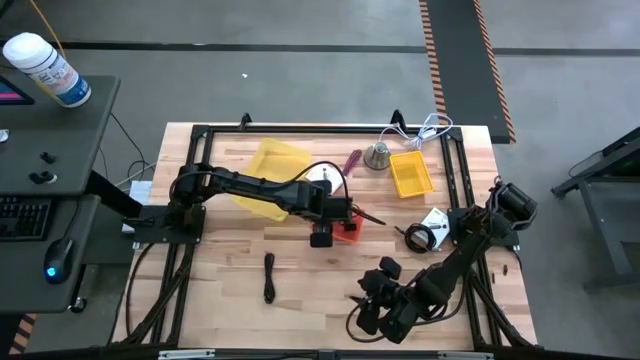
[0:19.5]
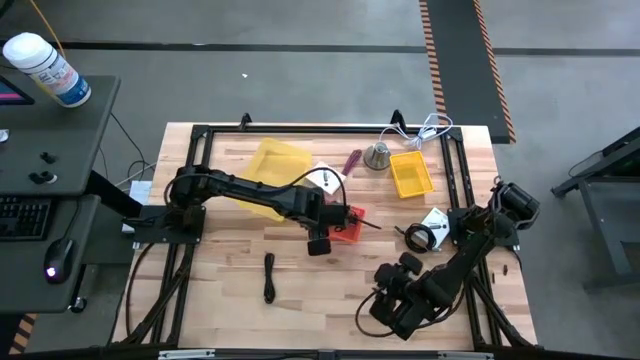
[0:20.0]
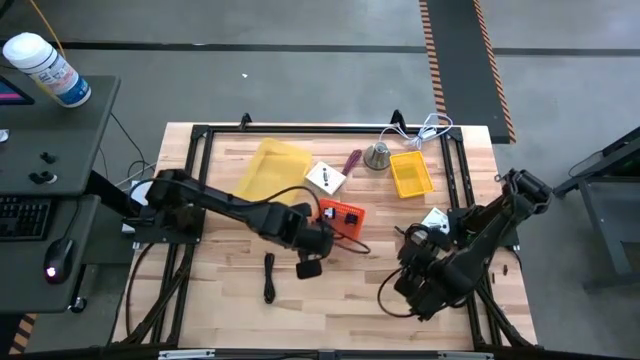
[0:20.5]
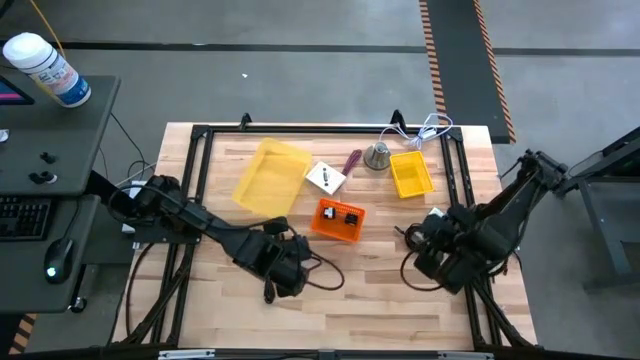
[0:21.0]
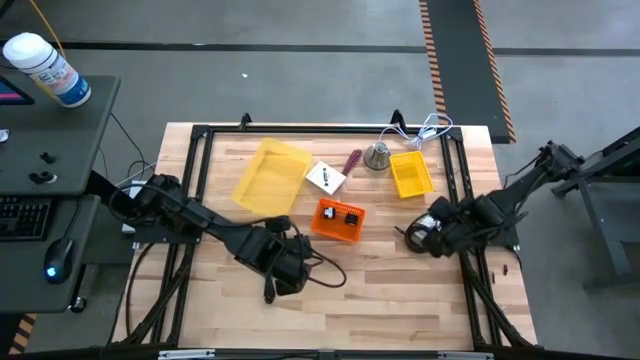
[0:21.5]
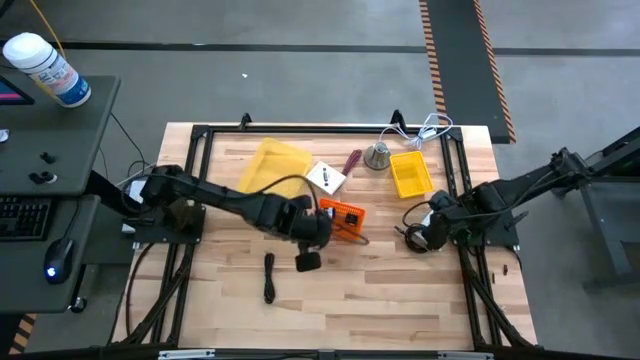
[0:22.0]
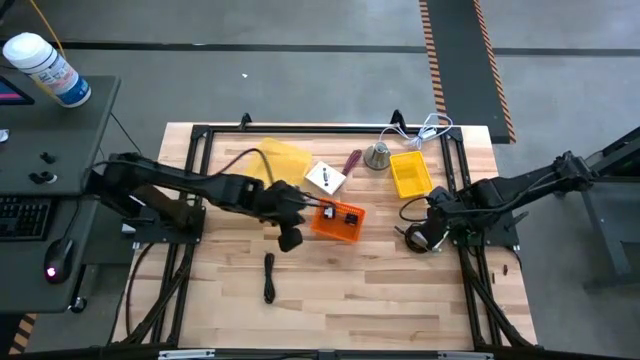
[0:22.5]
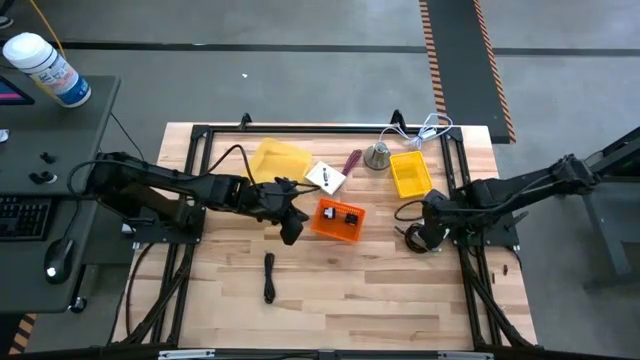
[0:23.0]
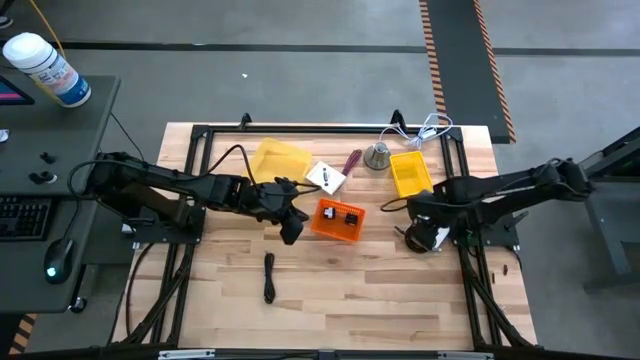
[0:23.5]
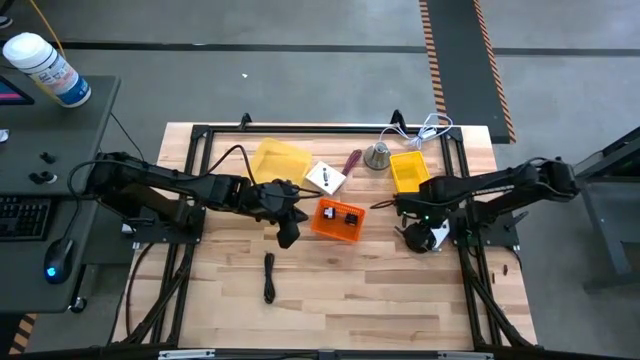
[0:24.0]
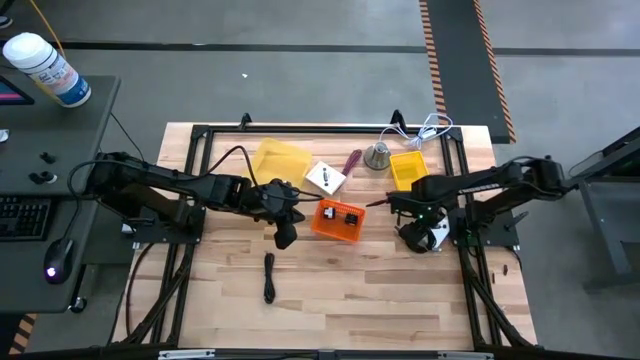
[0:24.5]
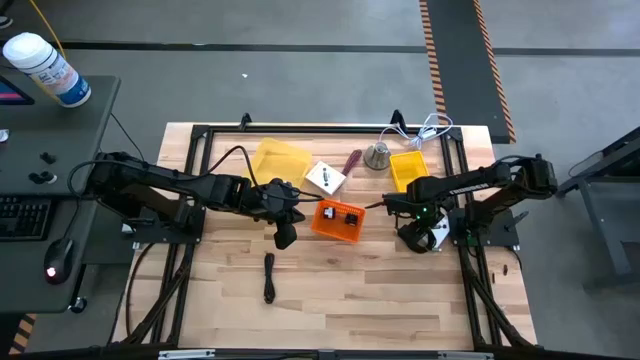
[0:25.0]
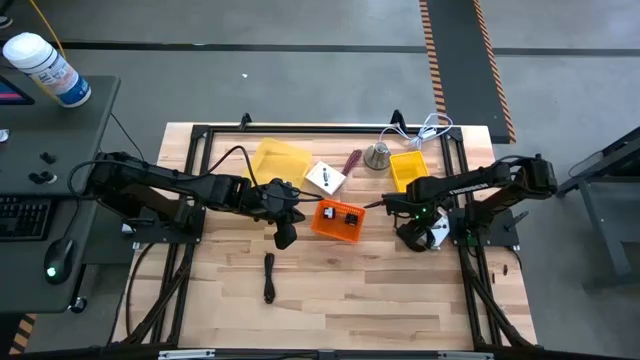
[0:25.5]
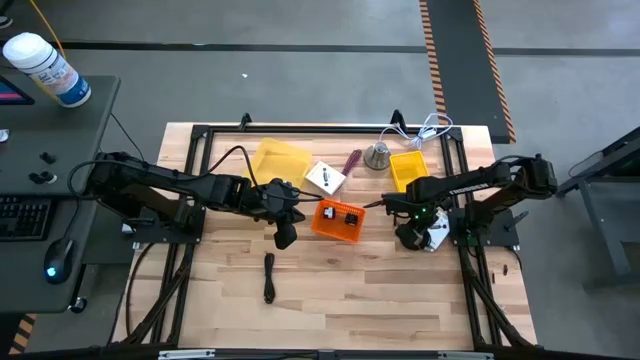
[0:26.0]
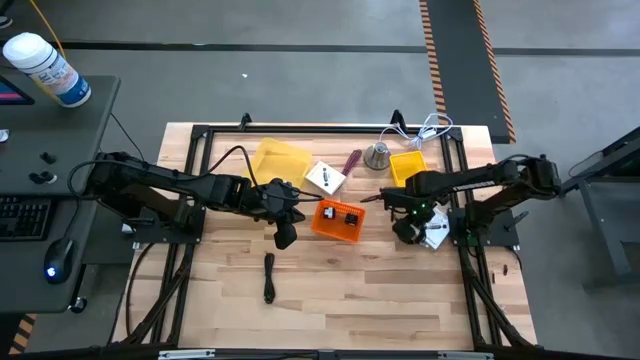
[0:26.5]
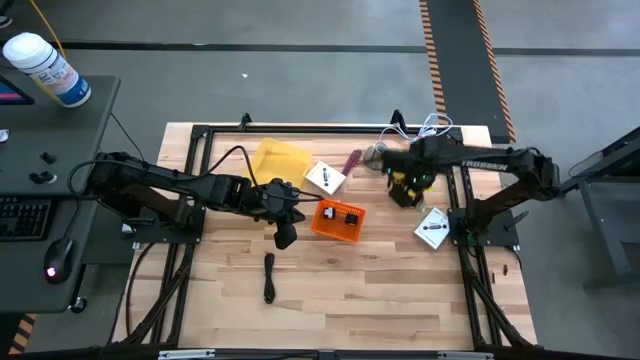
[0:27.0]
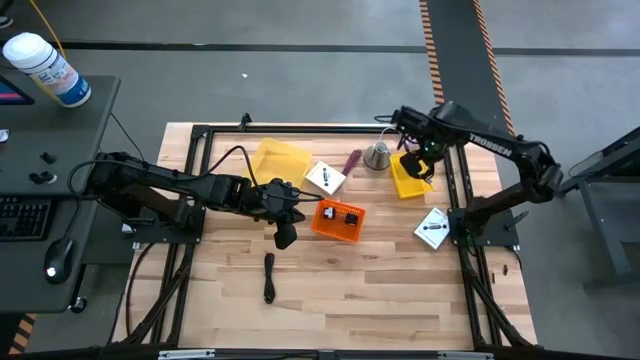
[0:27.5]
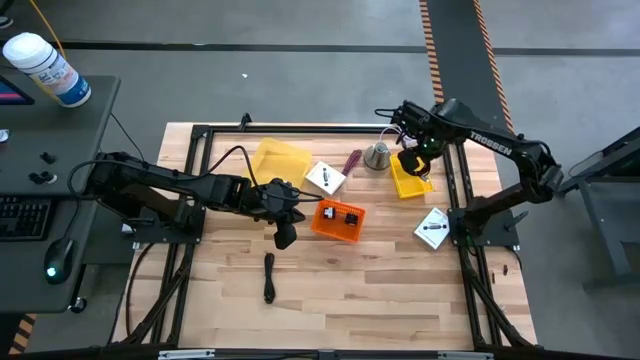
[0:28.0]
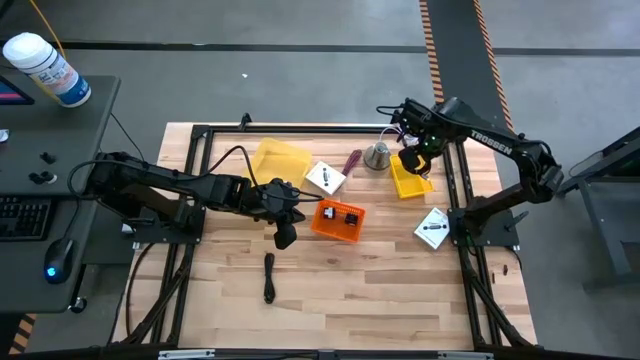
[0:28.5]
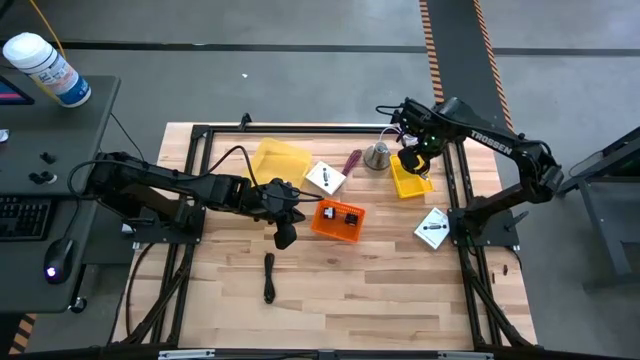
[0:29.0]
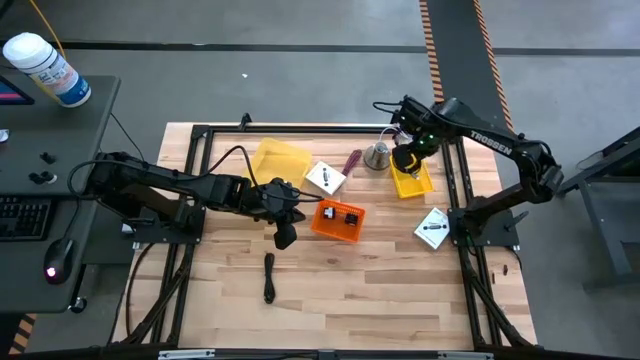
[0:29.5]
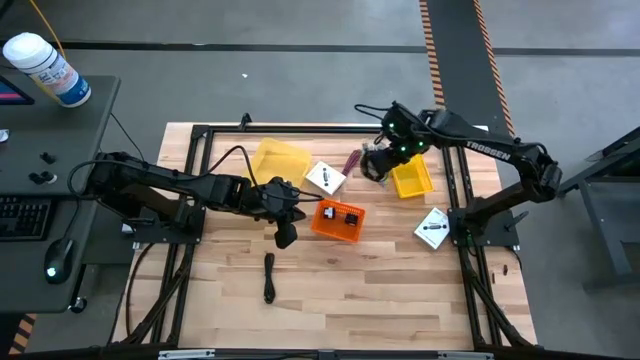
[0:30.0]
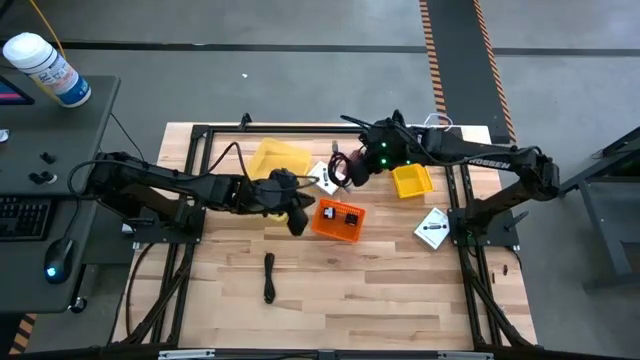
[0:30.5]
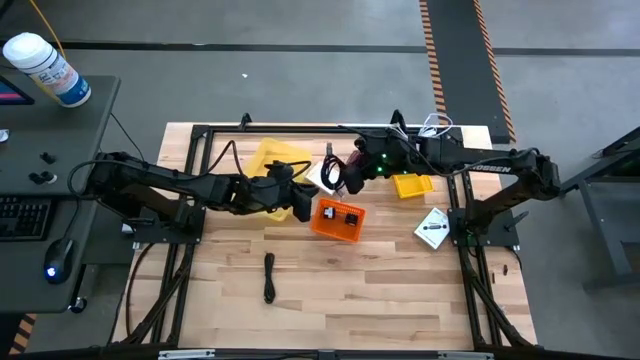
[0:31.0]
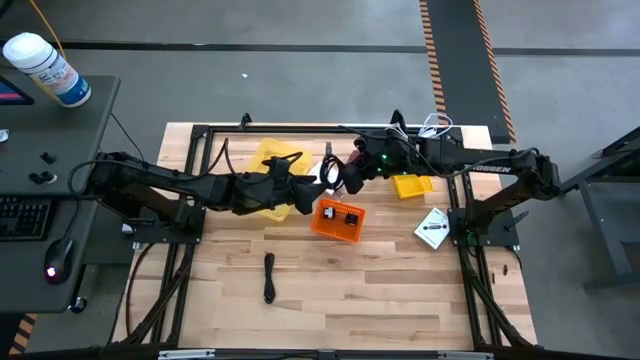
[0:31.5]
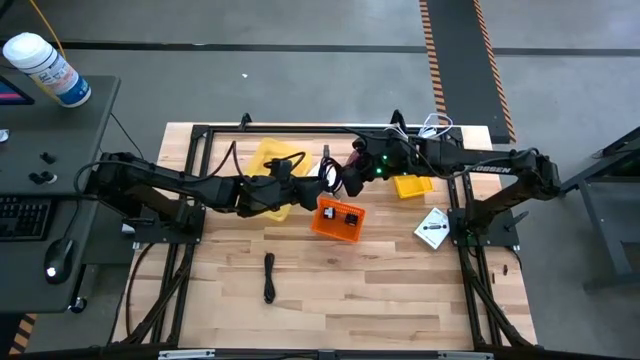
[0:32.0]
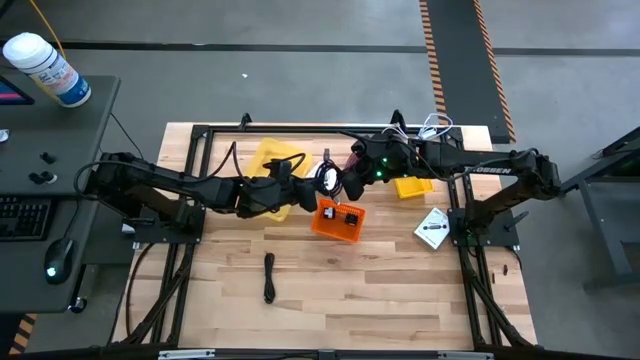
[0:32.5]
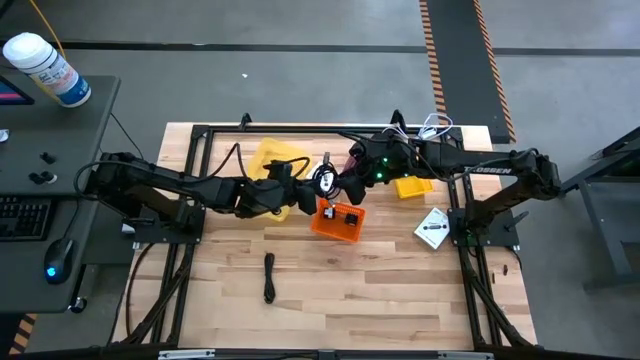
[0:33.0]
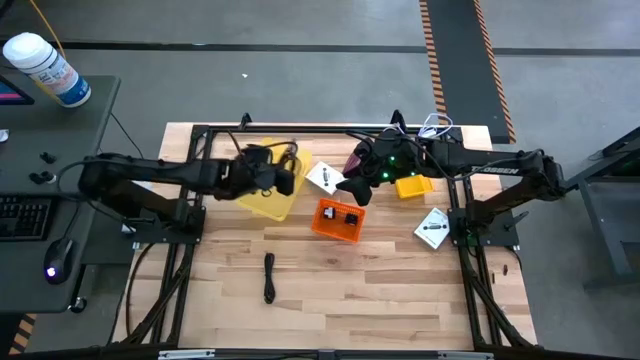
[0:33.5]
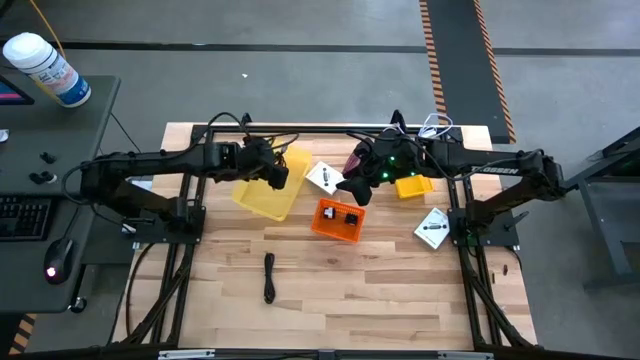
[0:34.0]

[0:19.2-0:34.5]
Task: Pick and place items into bin
Put the top black charger cable into the light yellow bin

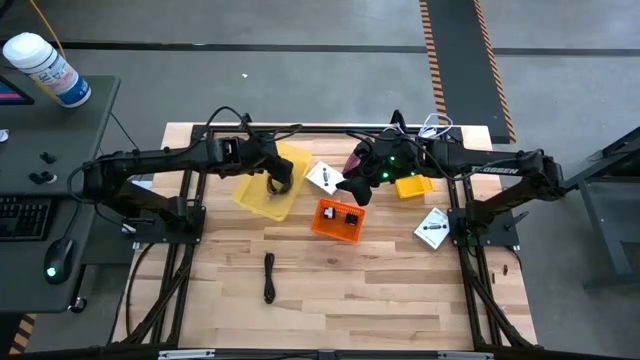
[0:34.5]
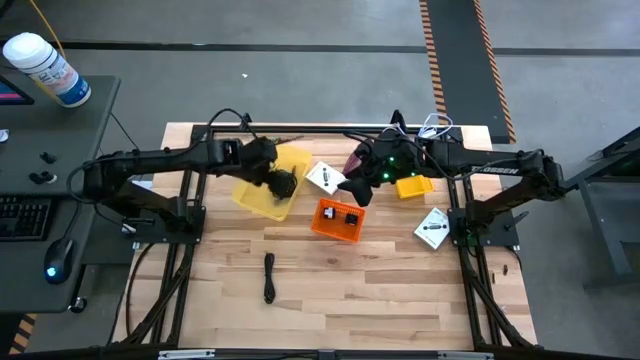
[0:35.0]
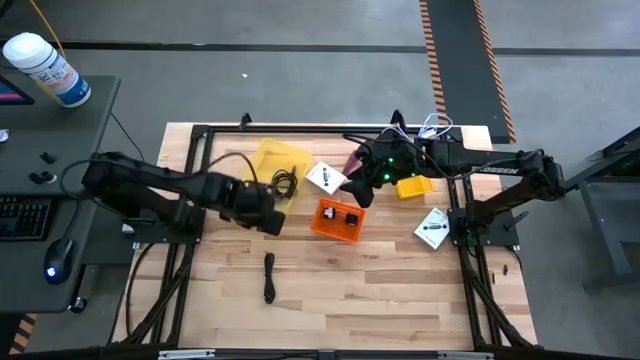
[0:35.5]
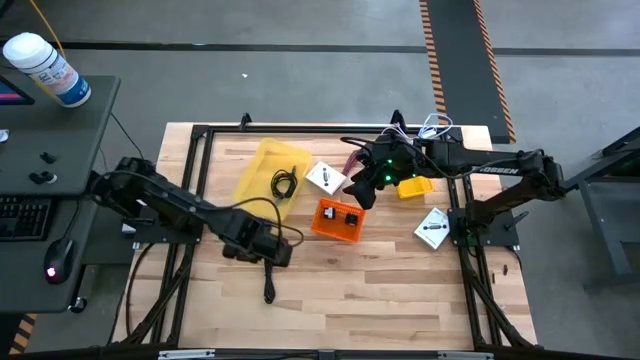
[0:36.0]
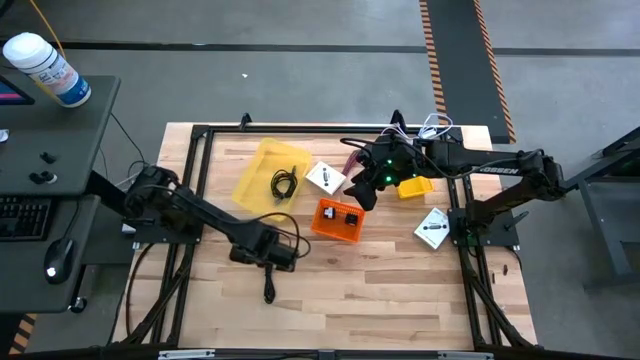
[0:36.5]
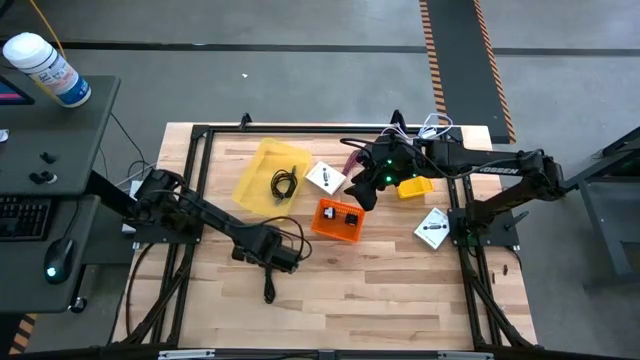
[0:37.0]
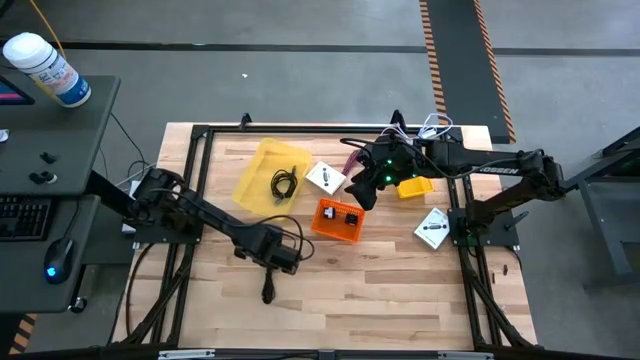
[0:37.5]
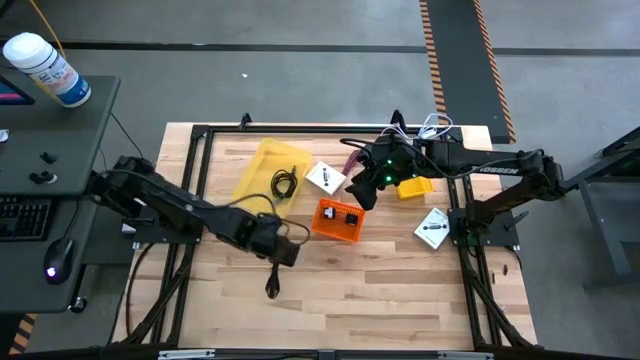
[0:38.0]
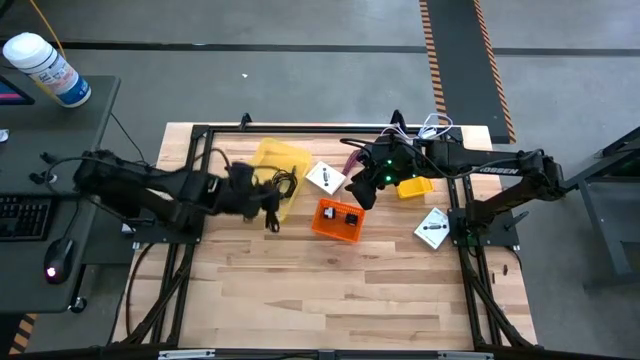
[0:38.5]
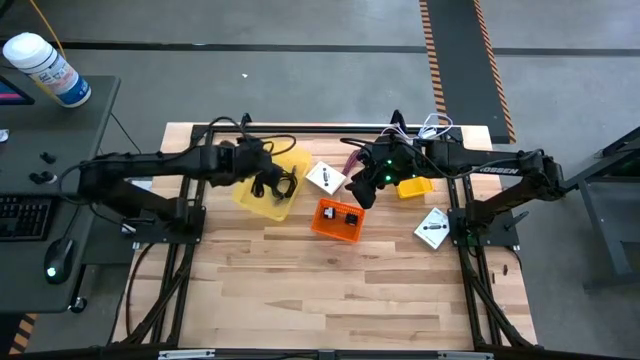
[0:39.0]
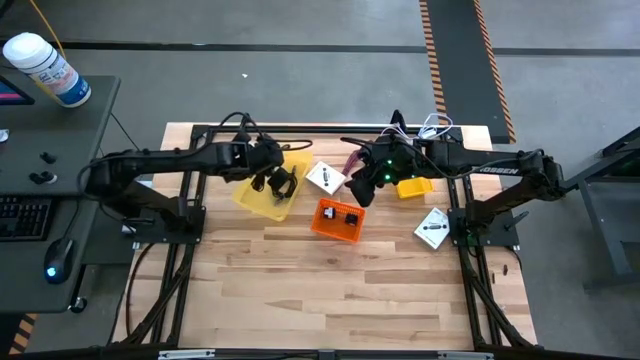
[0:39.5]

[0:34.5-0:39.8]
Put the black charger cable into the light yellow bin
